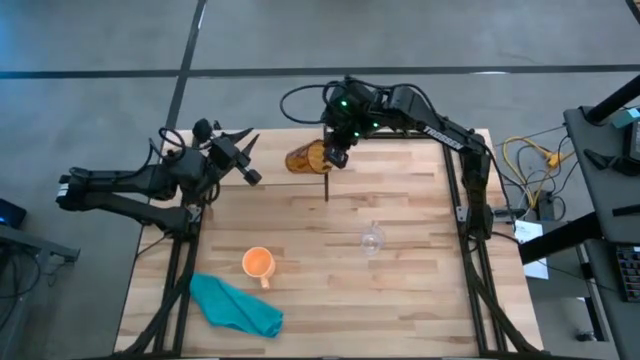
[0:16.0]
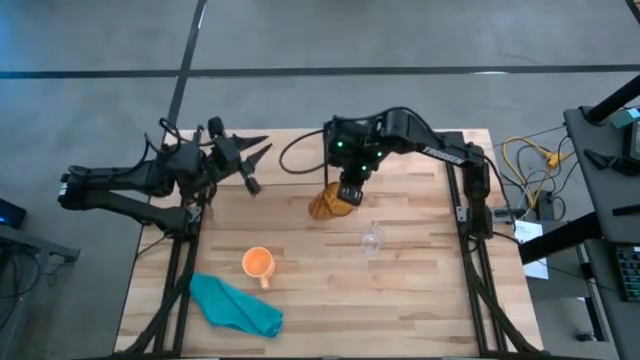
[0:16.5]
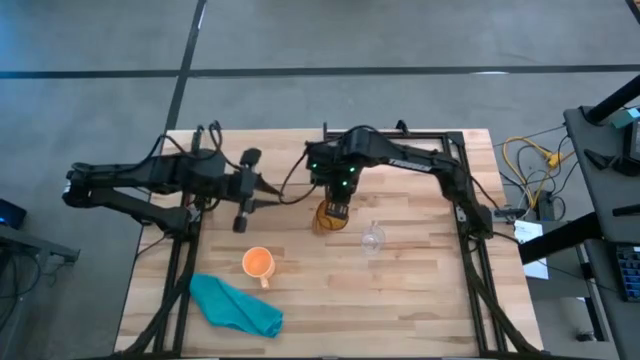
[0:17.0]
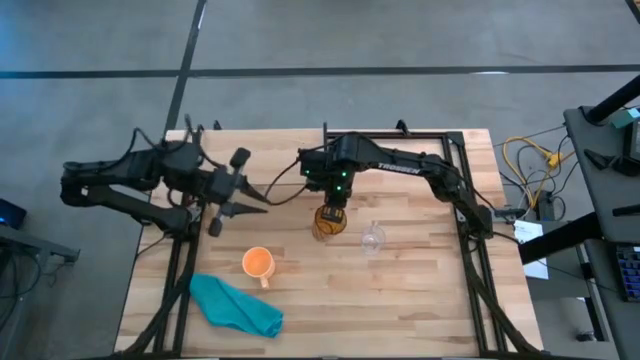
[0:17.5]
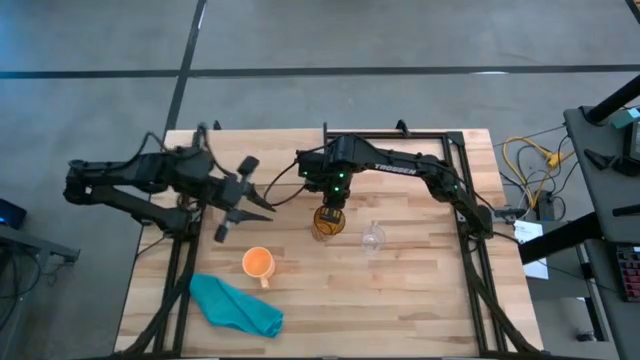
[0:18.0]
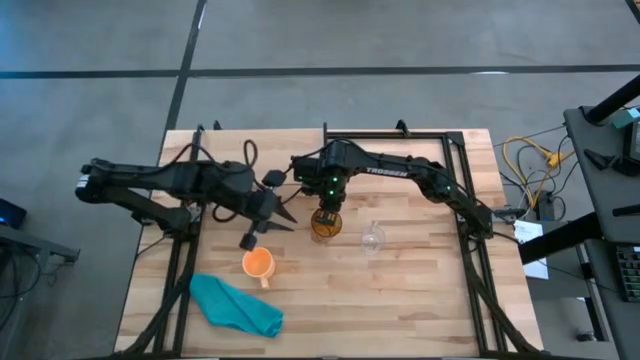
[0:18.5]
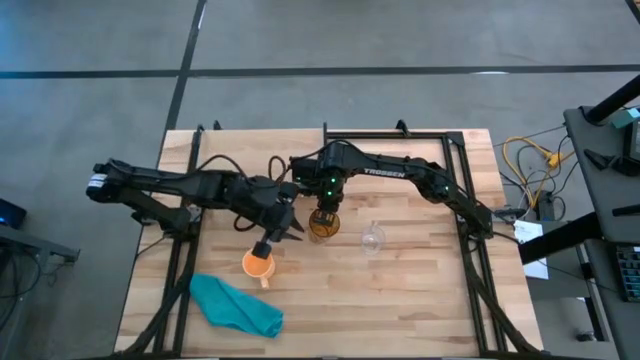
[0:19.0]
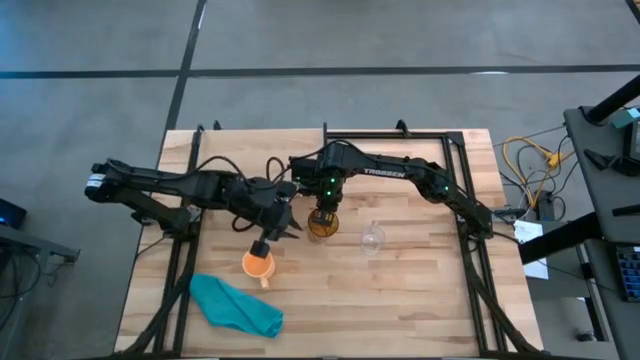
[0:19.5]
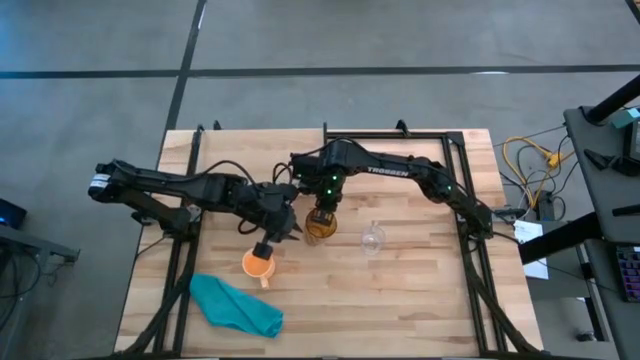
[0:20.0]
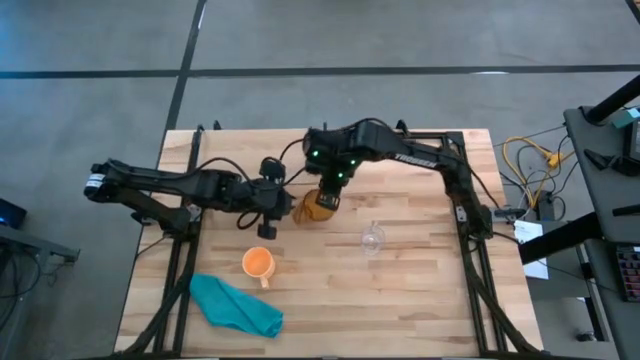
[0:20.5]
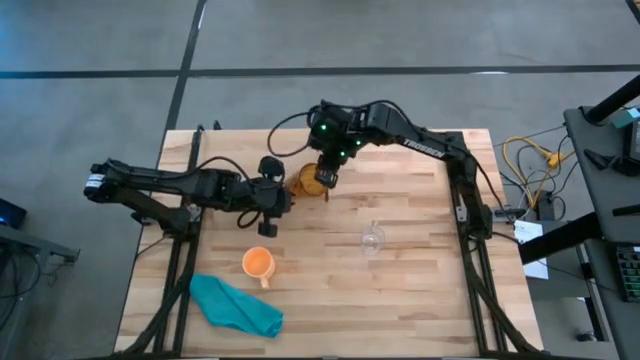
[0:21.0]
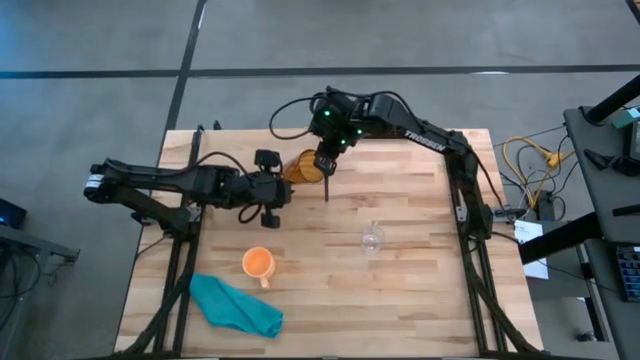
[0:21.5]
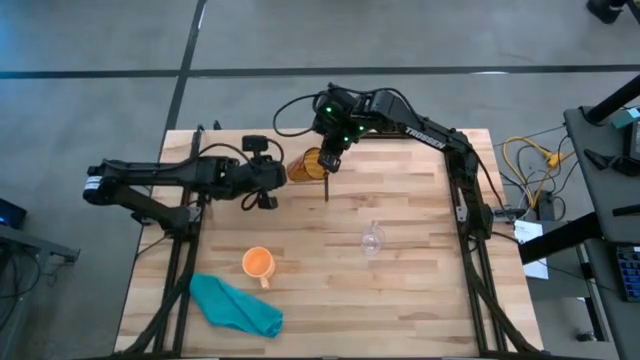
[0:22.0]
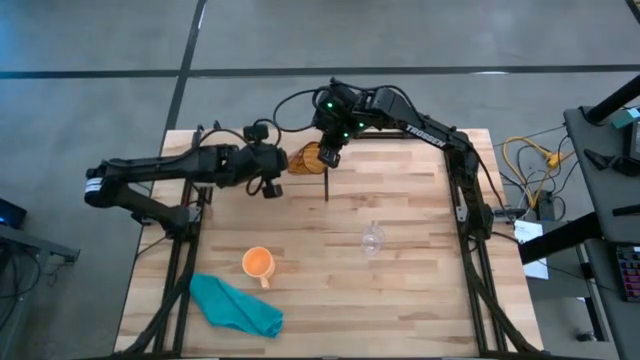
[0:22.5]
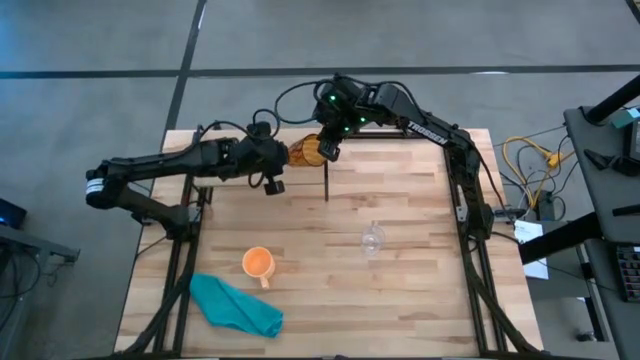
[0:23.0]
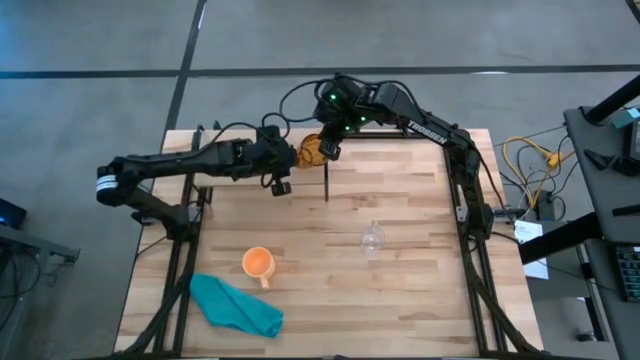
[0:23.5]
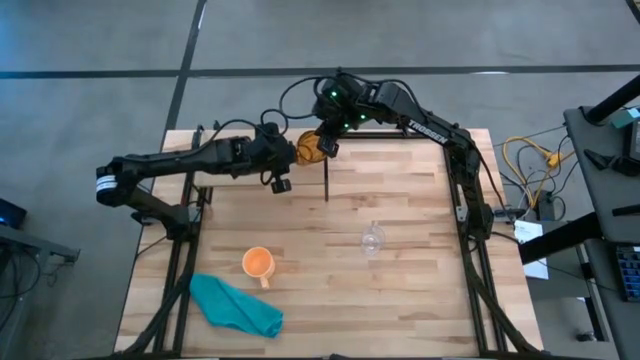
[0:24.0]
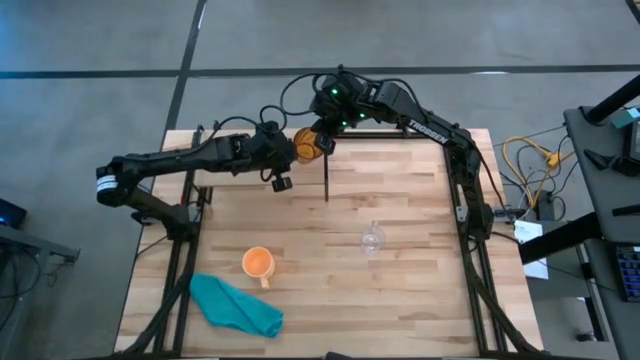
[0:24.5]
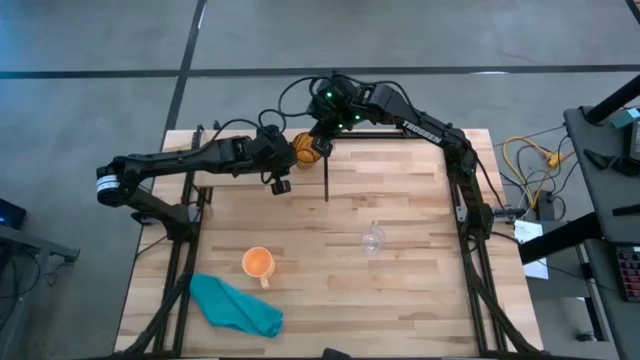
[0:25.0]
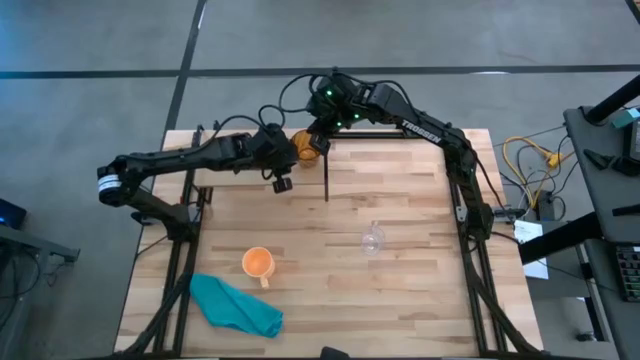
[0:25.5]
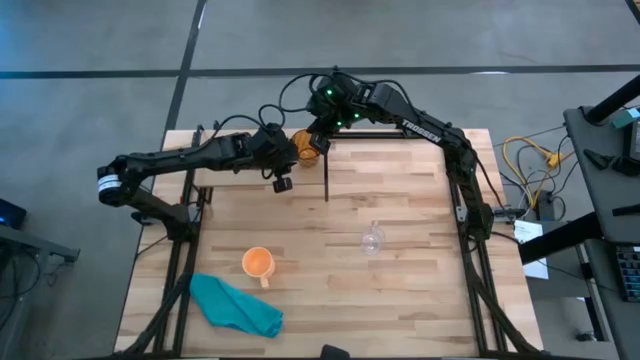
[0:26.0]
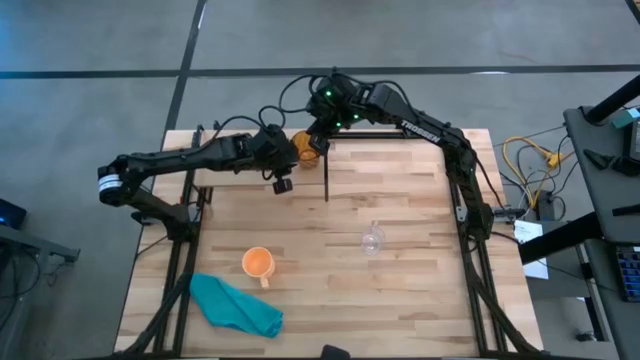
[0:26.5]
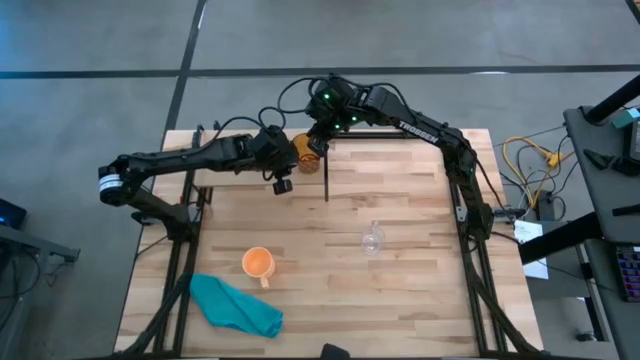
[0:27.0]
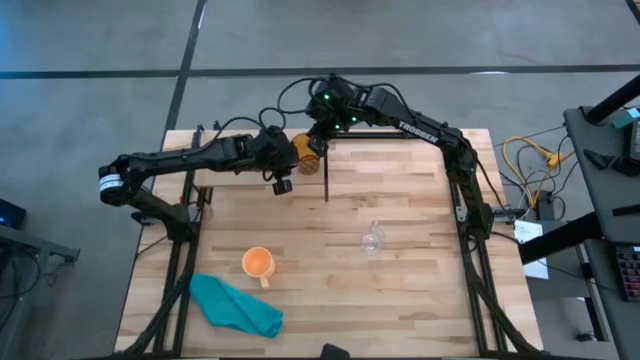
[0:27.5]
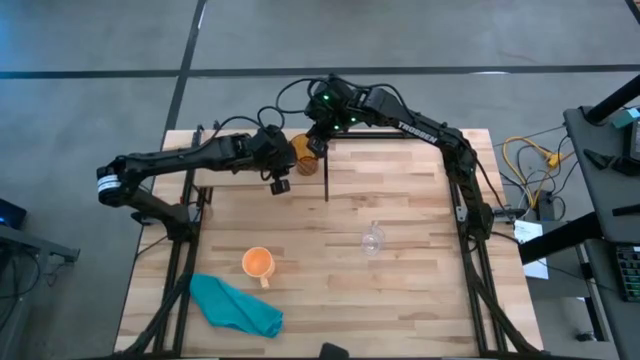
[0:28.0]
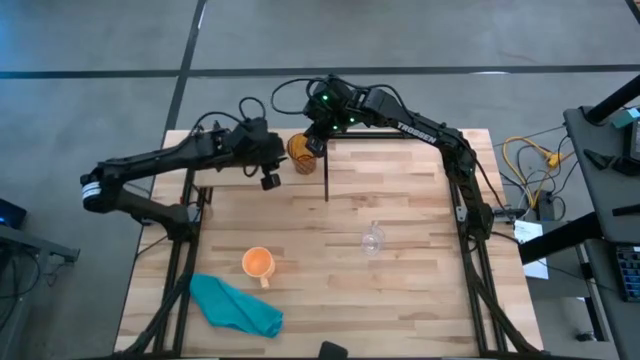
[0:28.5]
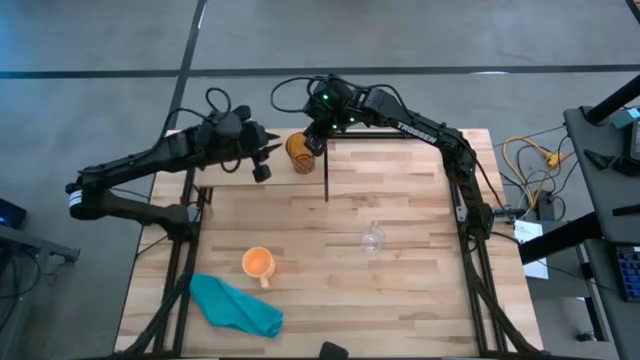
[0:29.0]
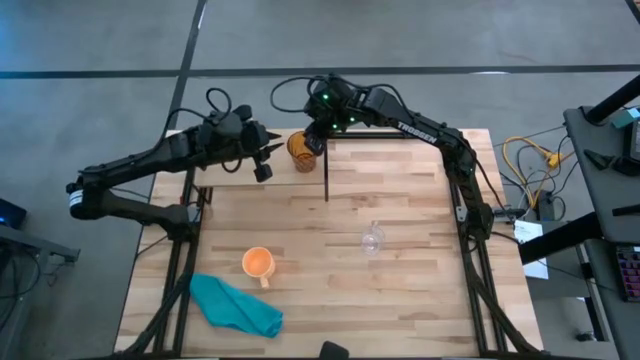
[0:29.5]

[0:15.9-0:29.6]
Task: Stack small to large cups/mugs on shelf
Put the brown glass on the shelf

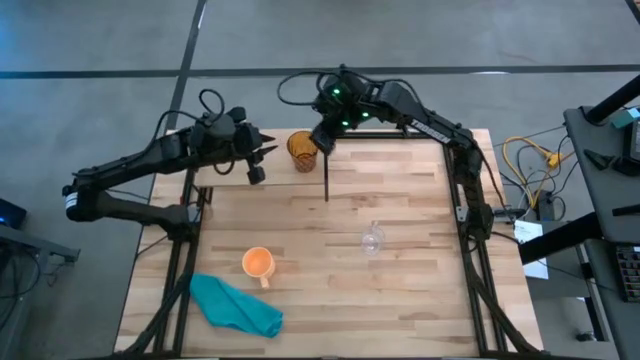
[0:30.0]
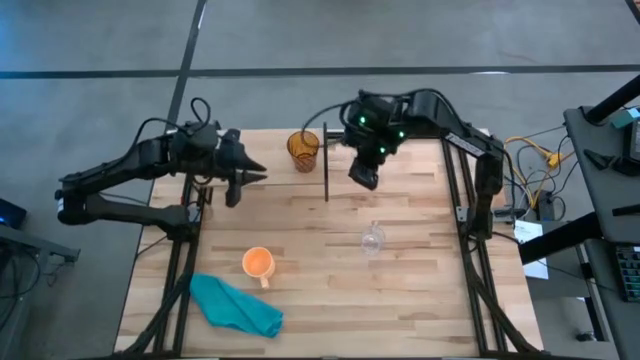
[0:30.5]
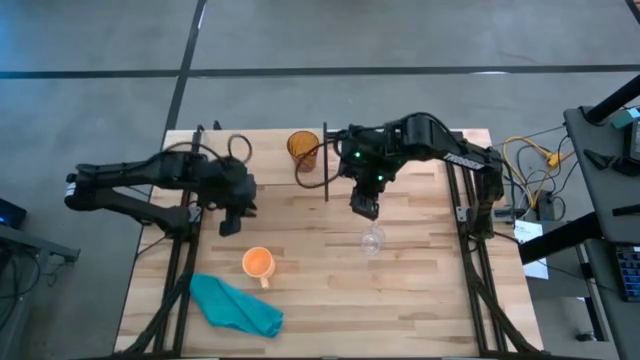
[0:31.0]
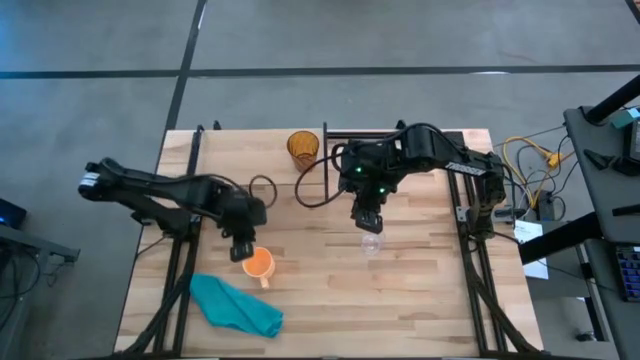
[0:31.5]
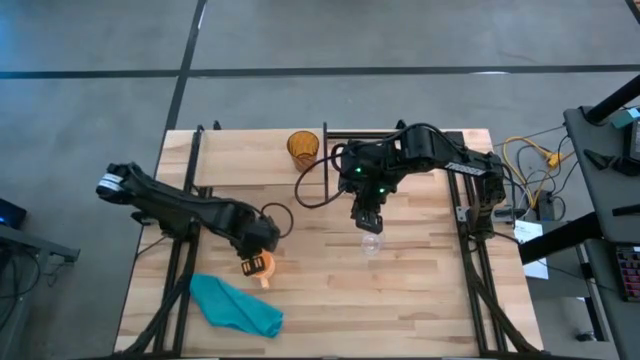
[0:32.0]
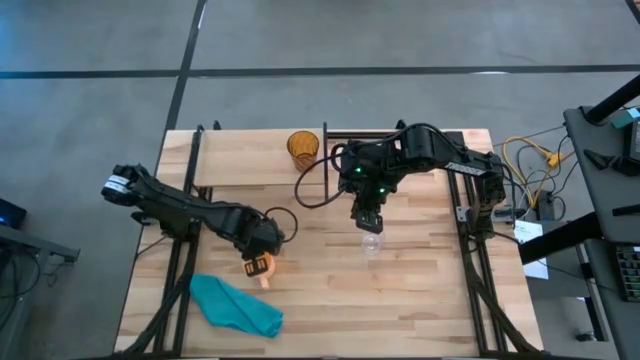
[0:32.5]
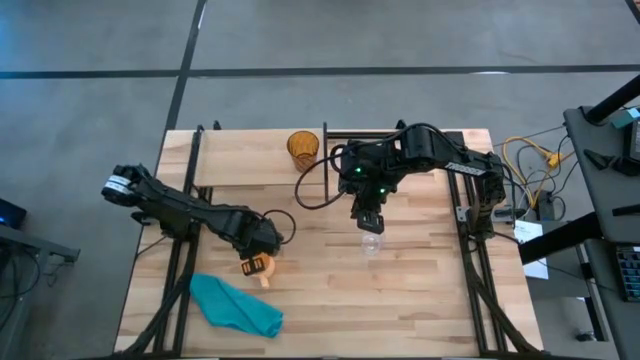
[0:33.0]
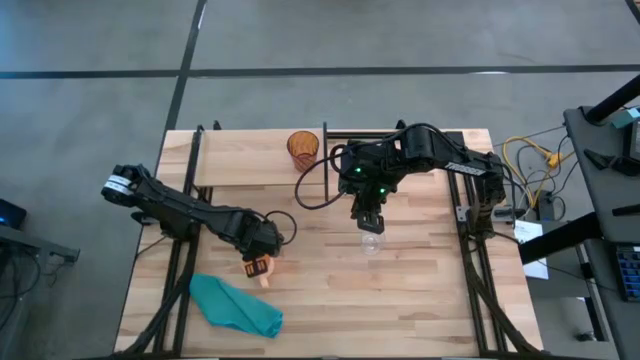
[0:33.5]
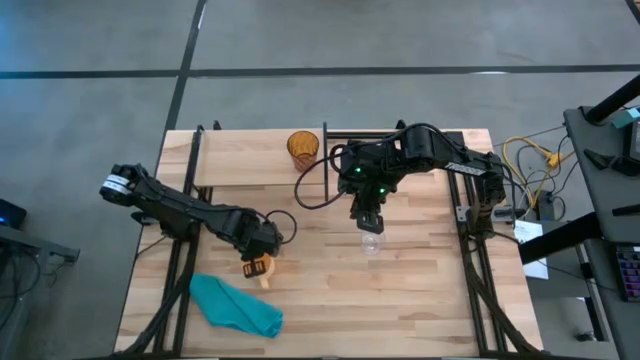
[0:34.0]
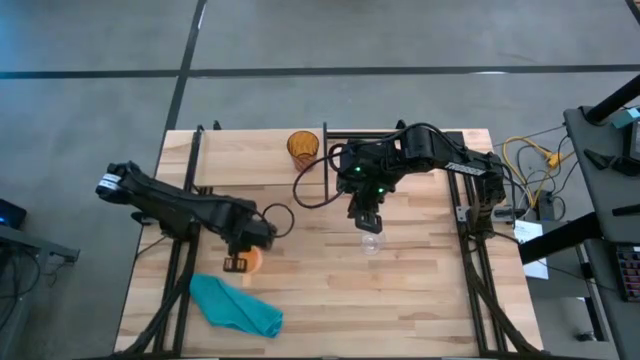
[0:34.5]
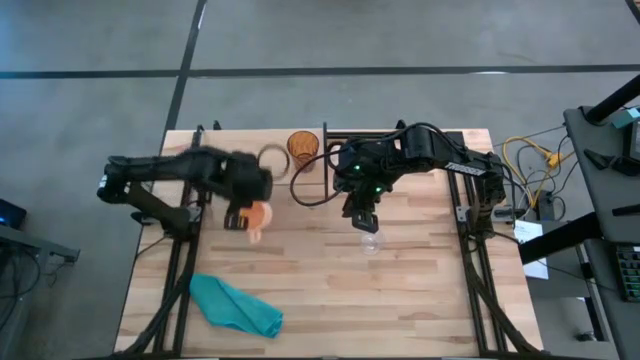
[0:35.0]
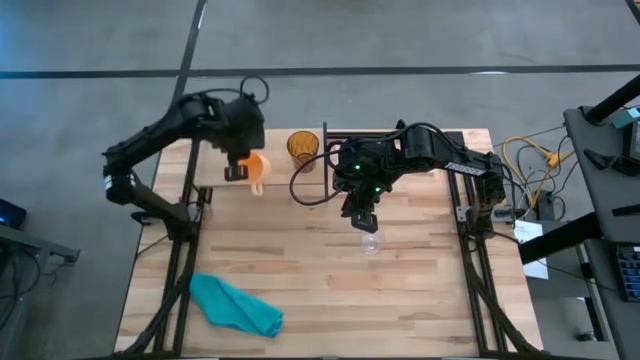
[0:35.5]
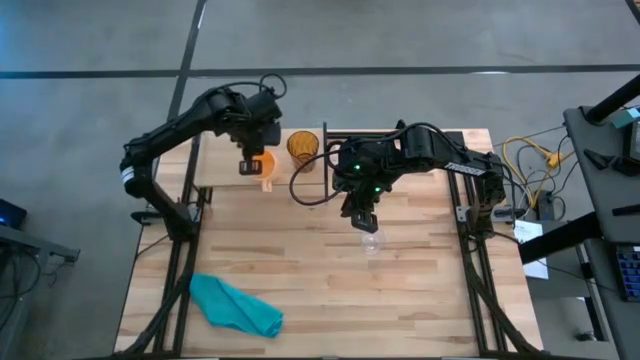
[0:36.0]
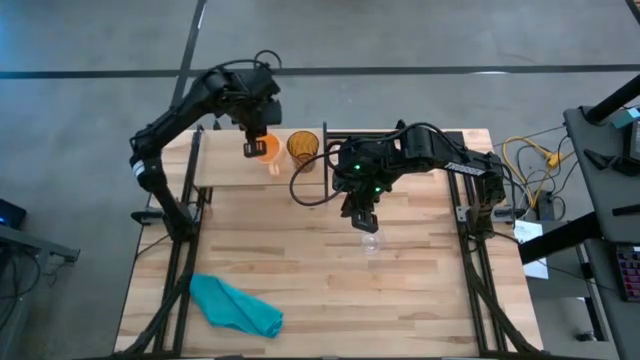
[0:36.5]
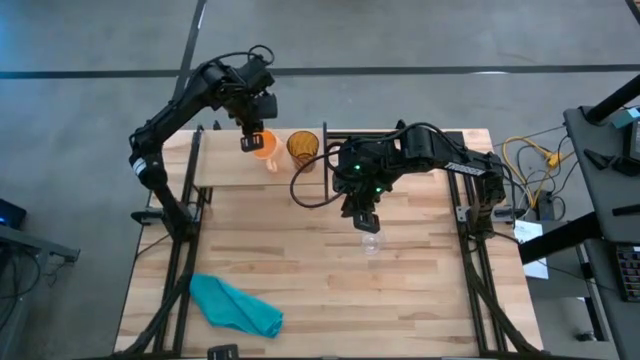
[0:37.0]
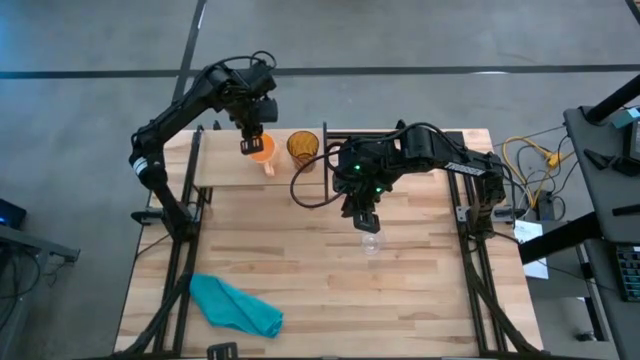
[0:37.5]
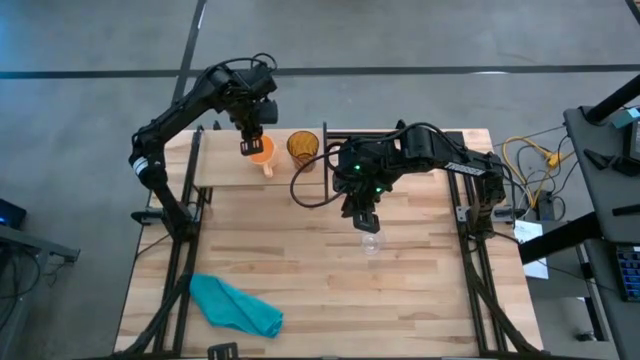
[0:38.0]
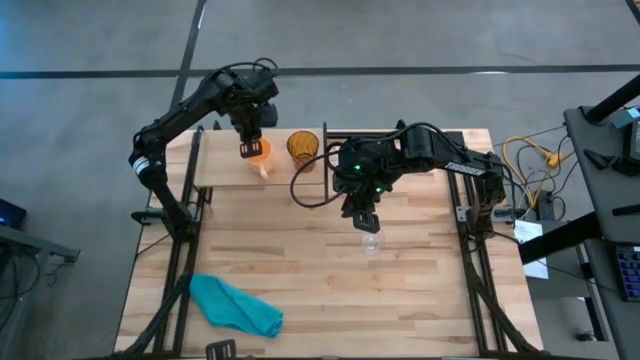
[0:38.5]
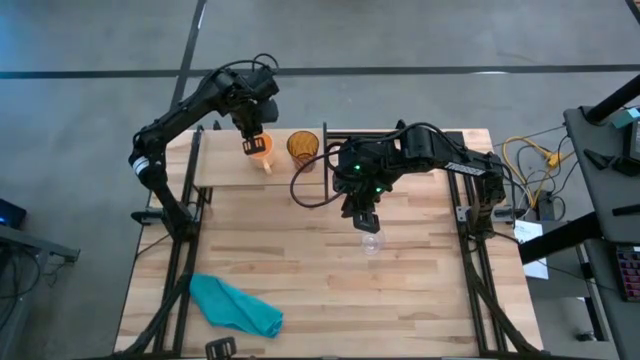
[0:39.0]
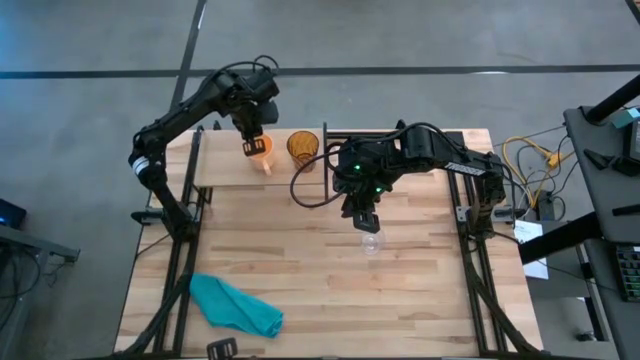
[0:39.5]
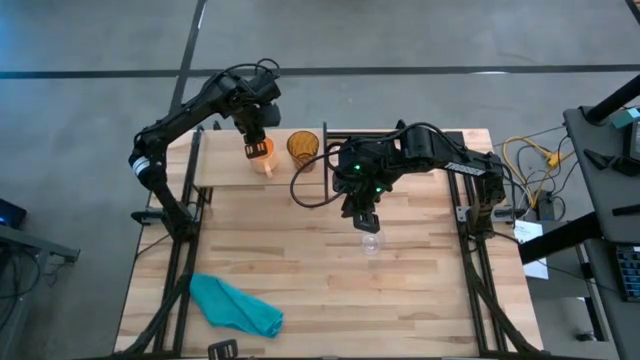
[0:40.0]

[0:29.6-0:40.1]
Put the orange mug on the shelf
